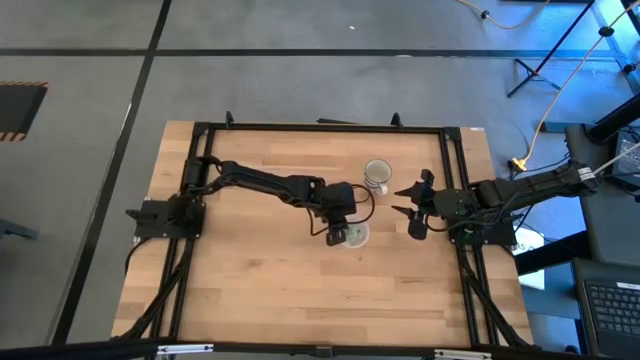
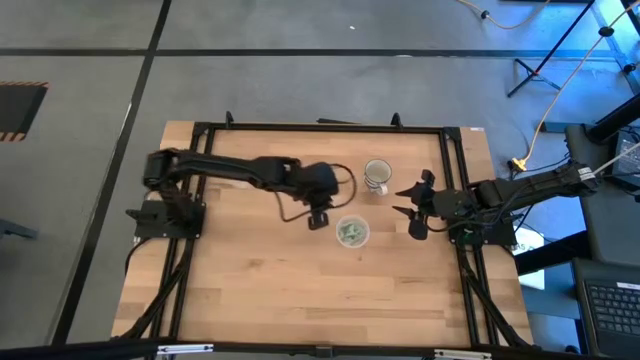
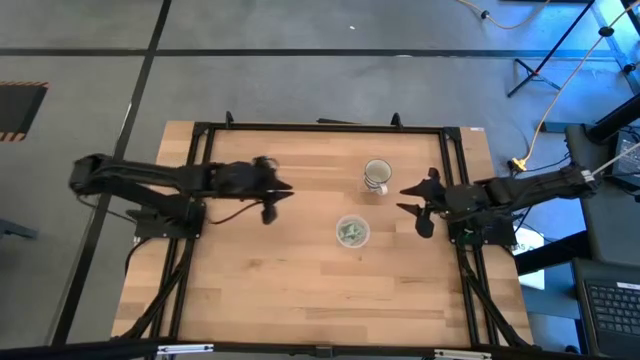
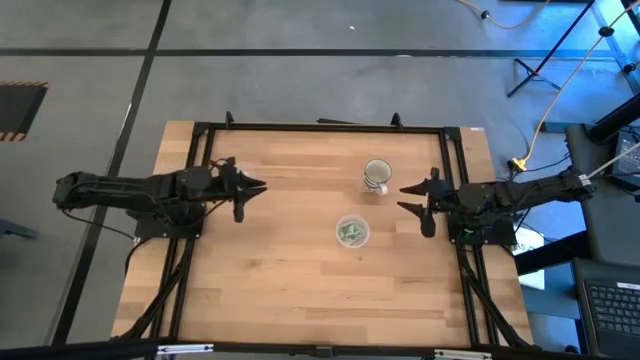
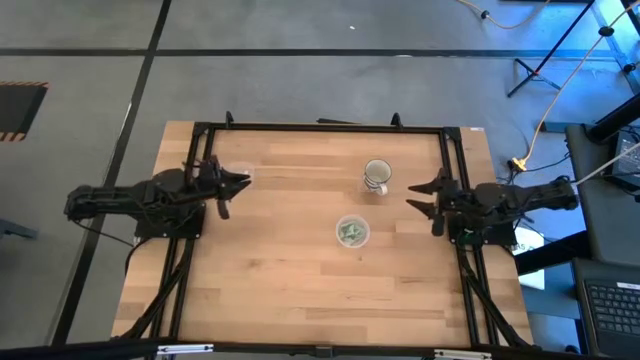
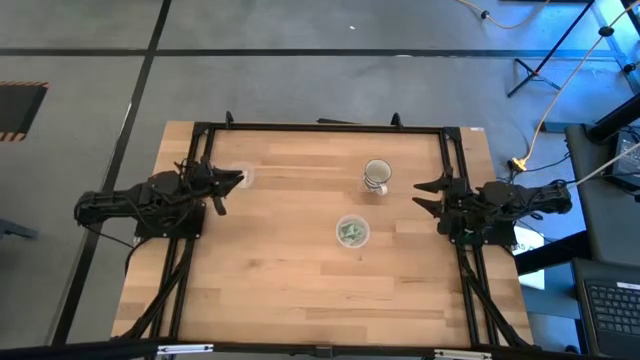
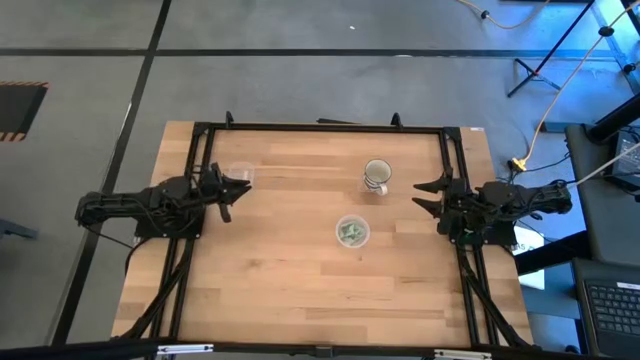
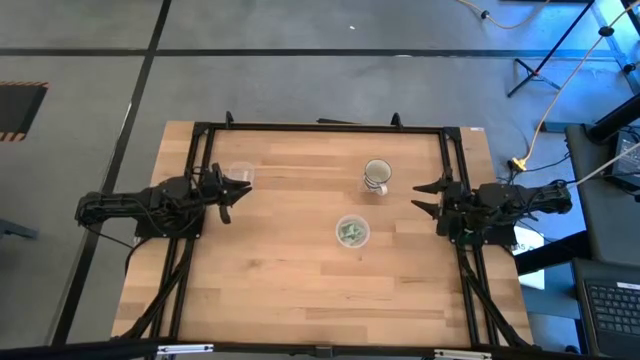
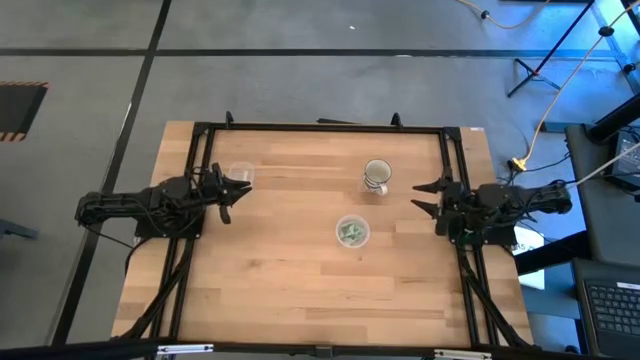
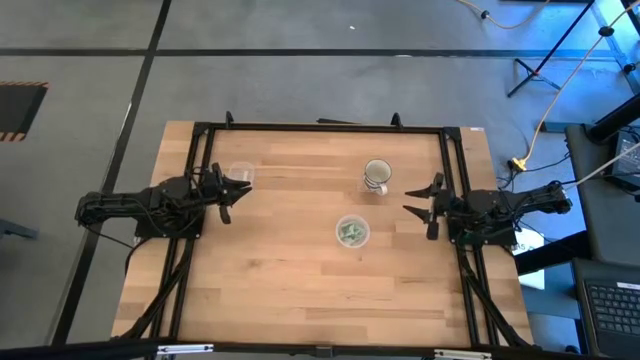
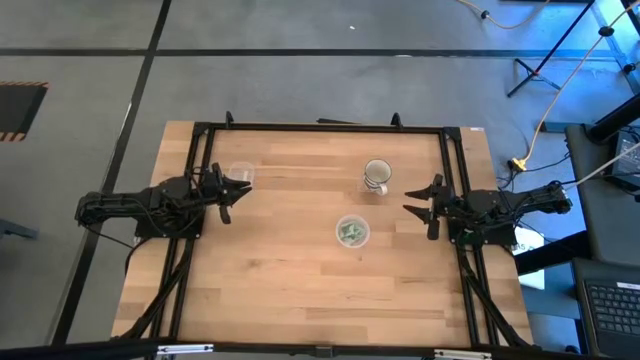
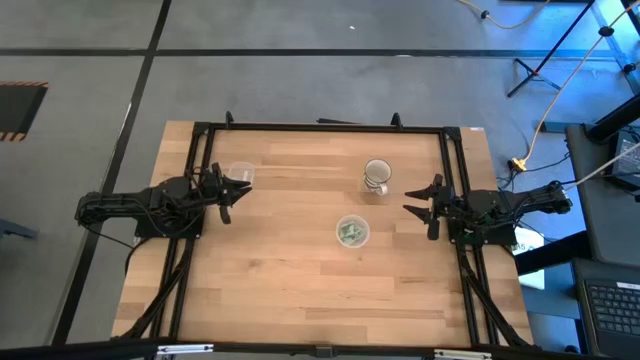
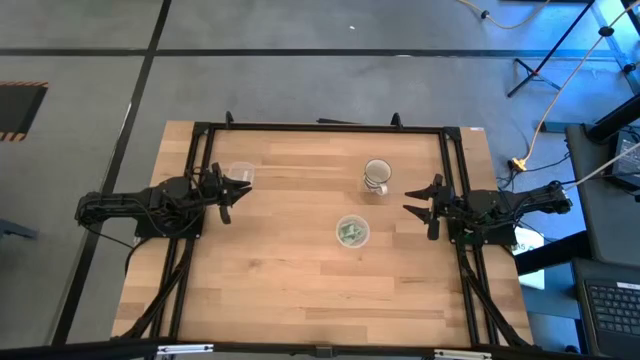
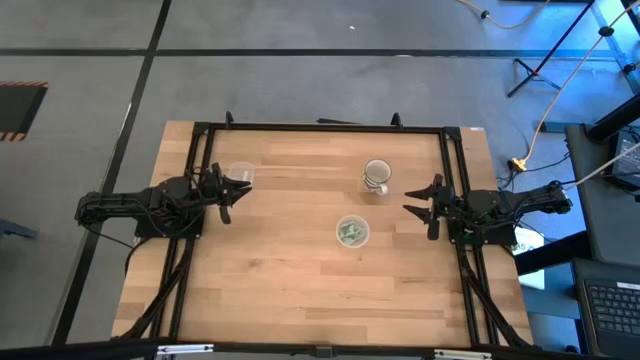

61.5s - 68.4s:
Task: Pick and place Stevia / Truvia into bins
Return to Home Position

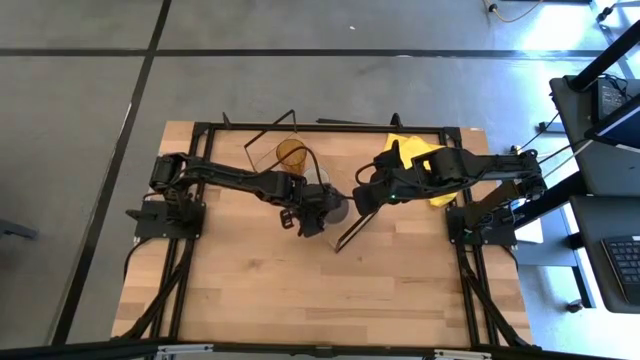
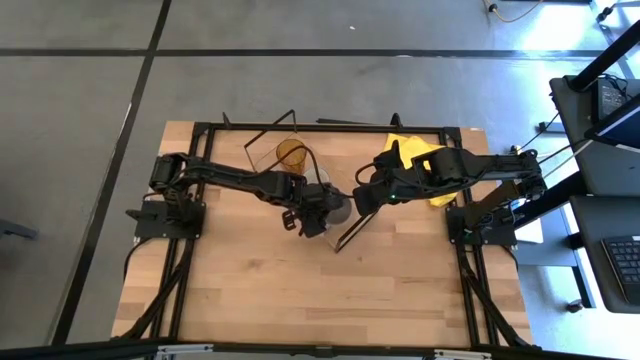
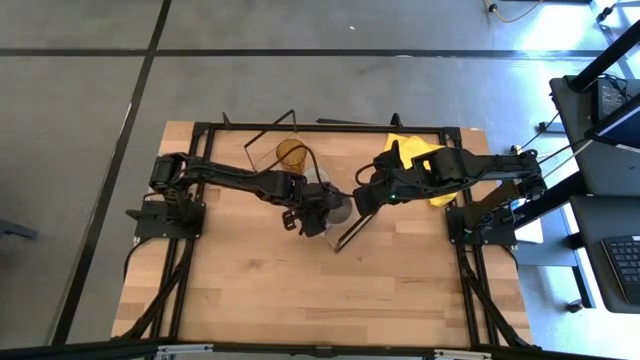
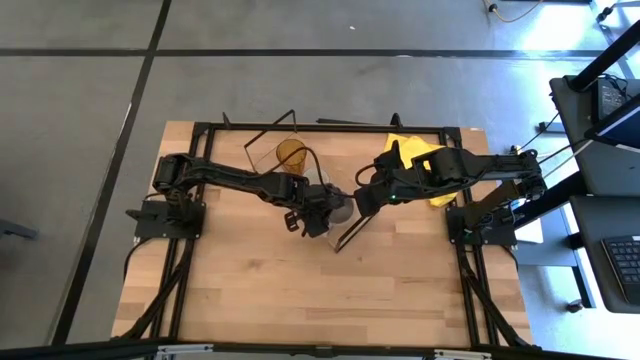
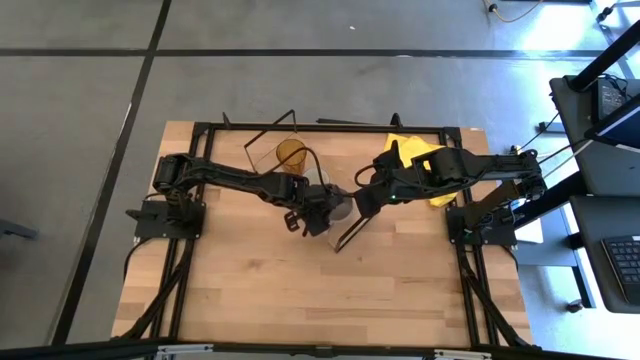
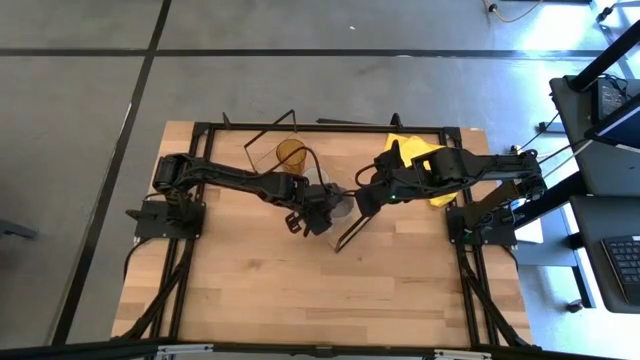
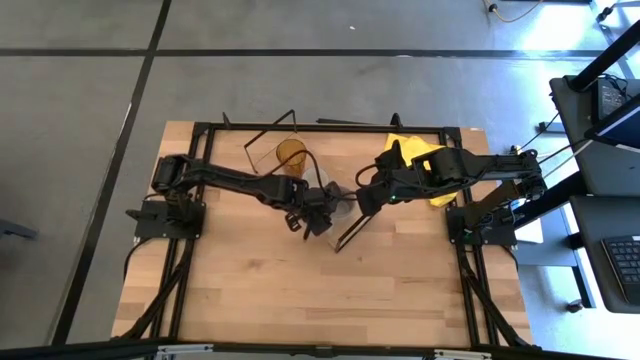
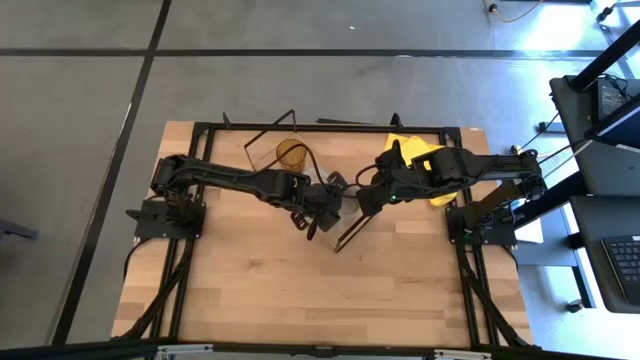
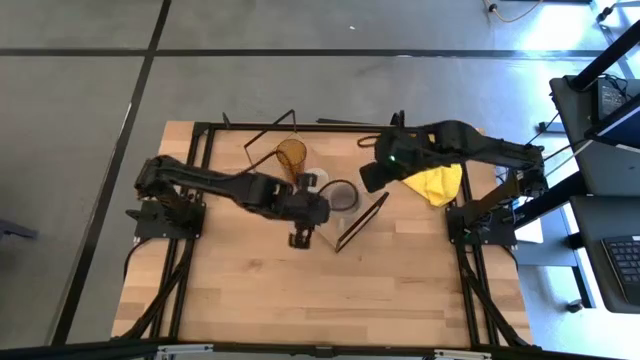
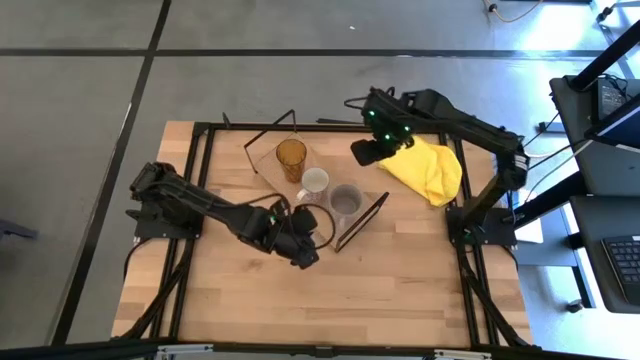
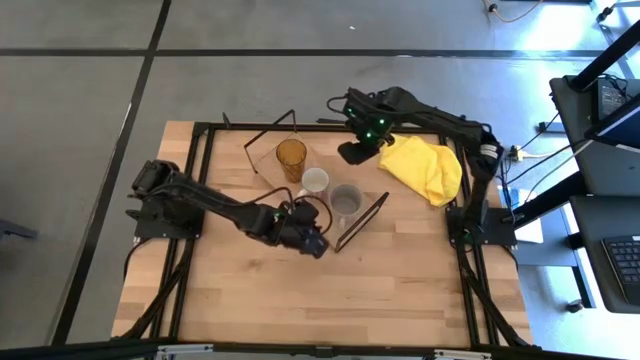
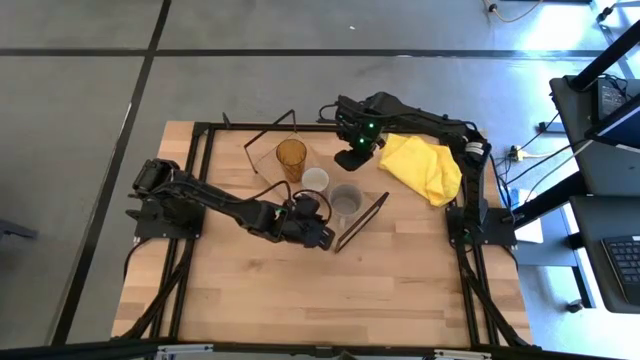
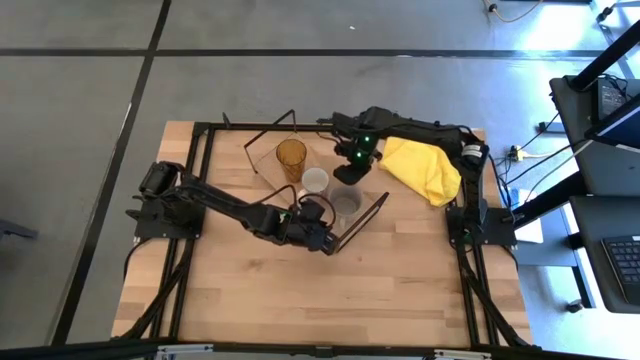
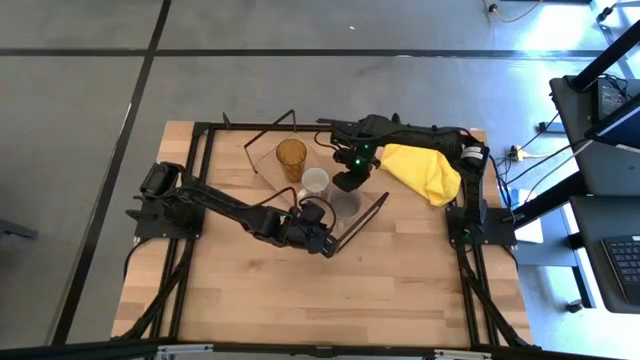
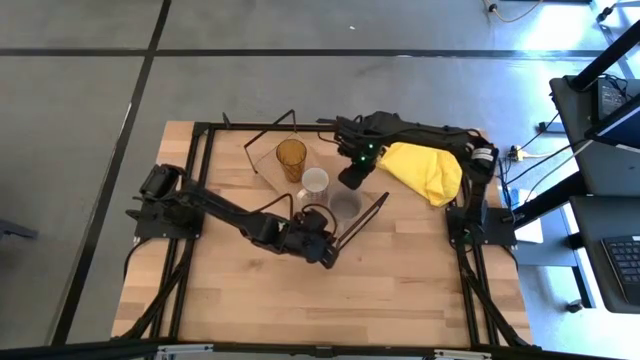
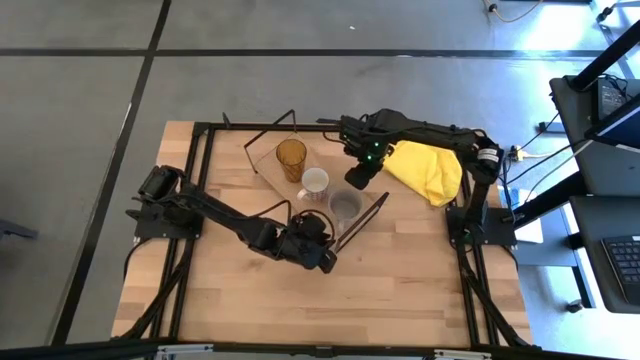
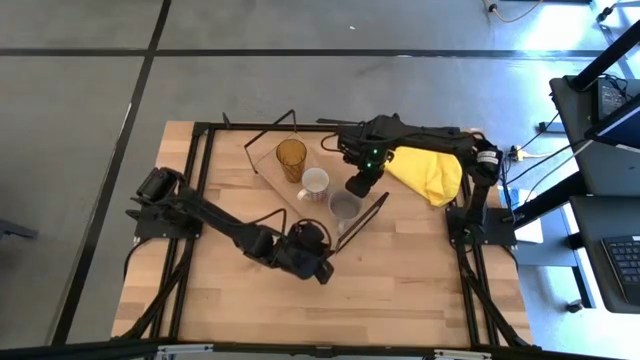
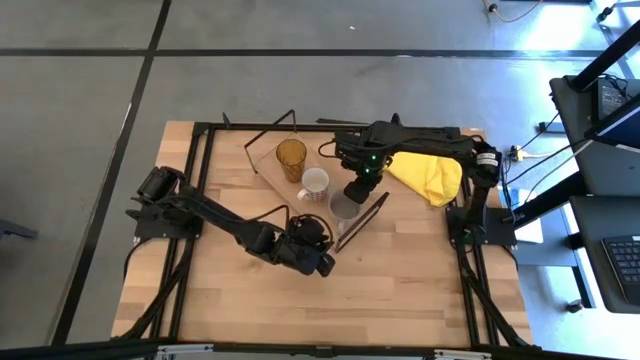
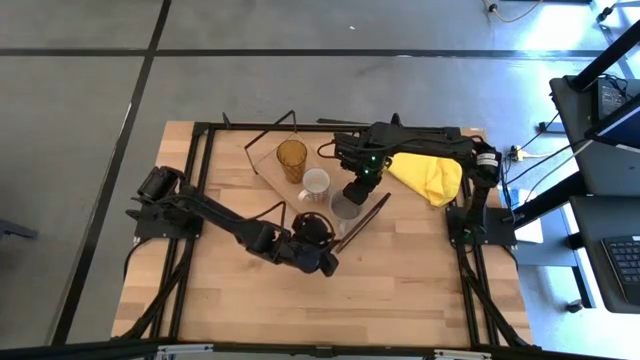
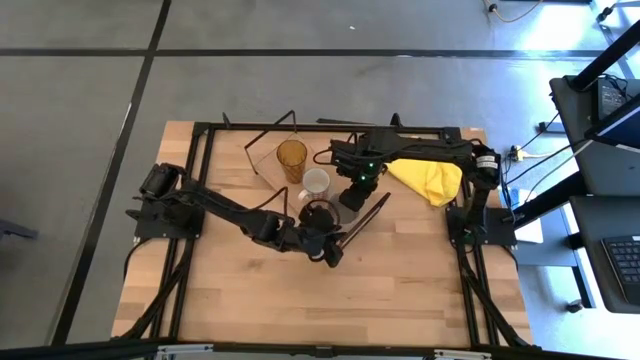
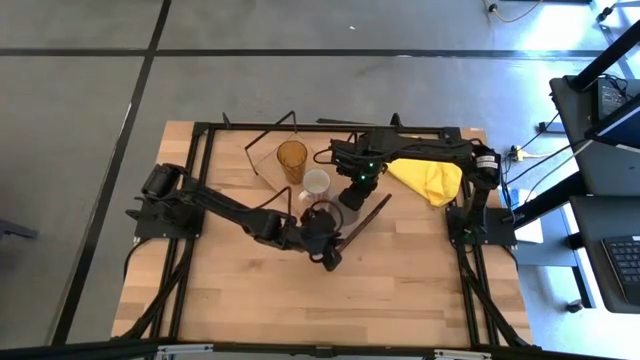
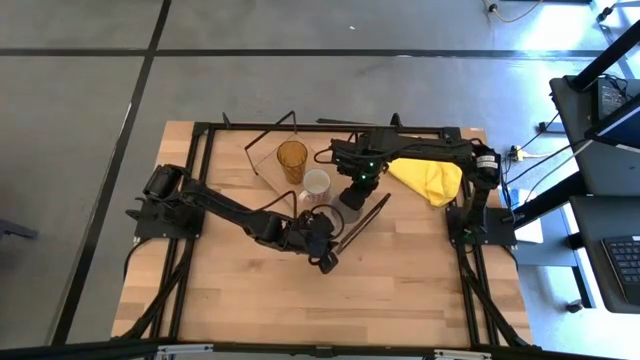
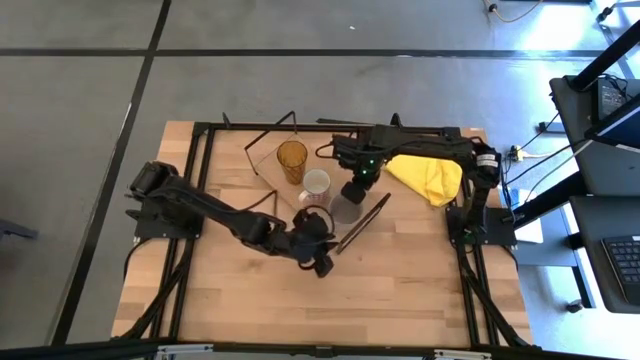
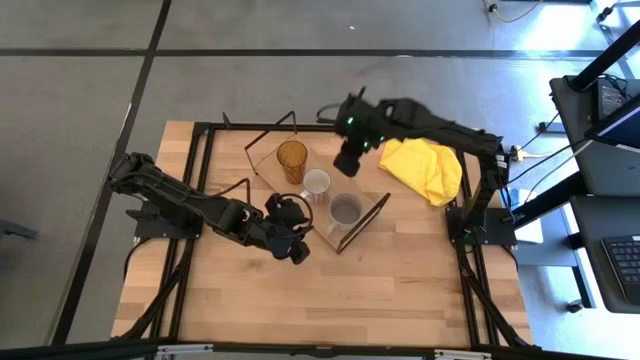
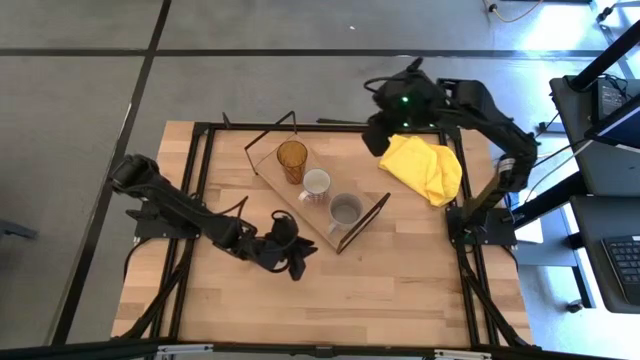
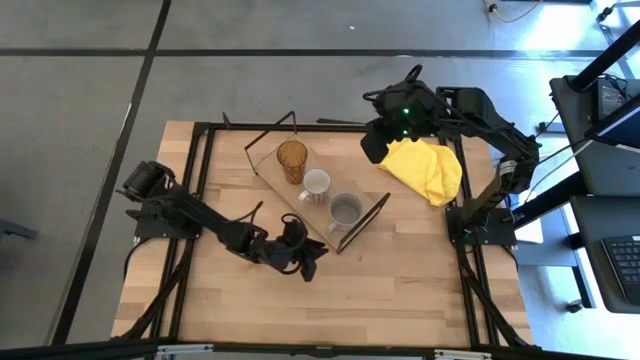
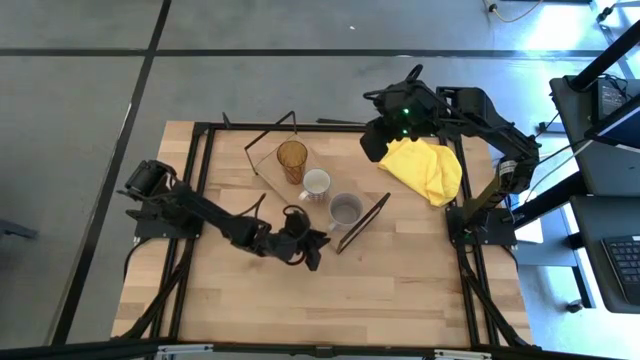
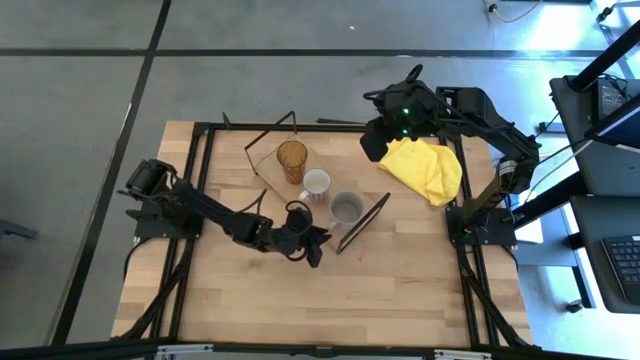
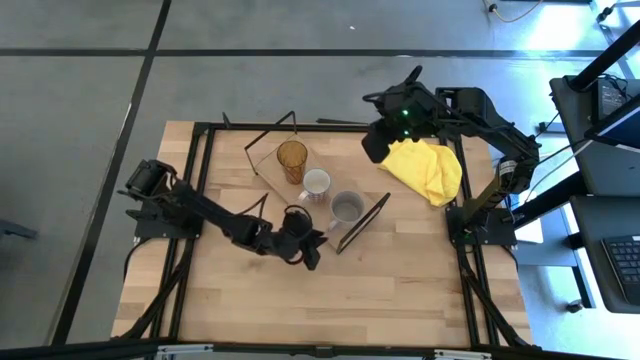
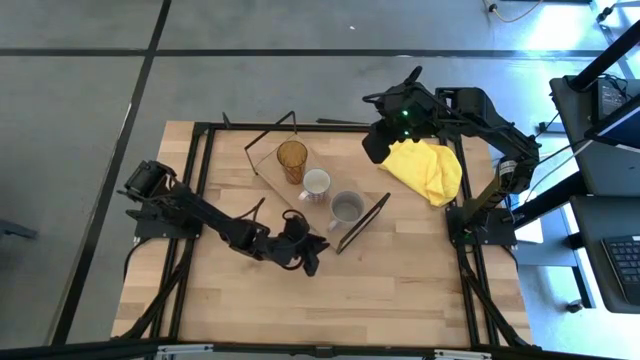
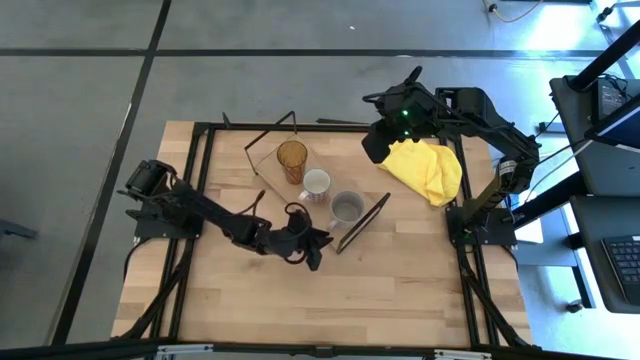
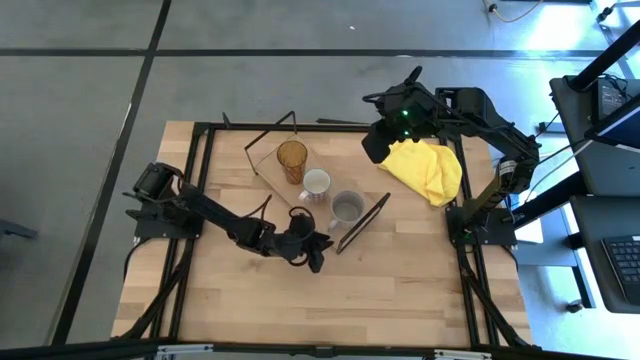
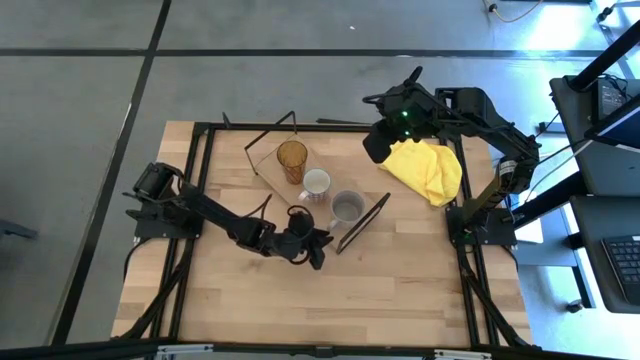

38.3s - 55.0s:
Task: Stack small to large cups/mugs on shelf
Put the grey patterned mug on the shelf
